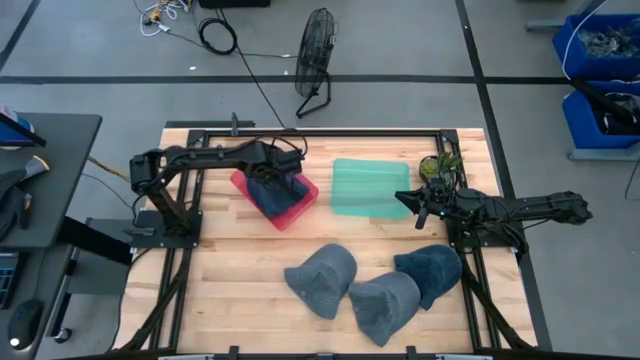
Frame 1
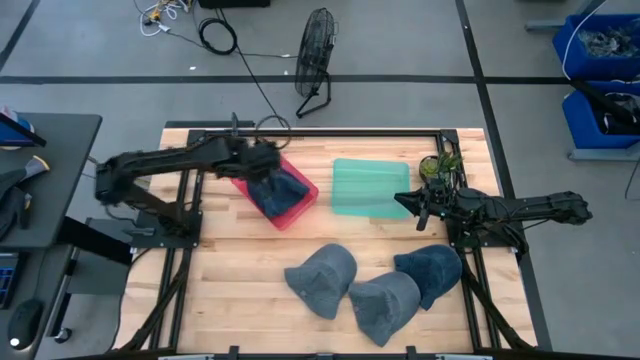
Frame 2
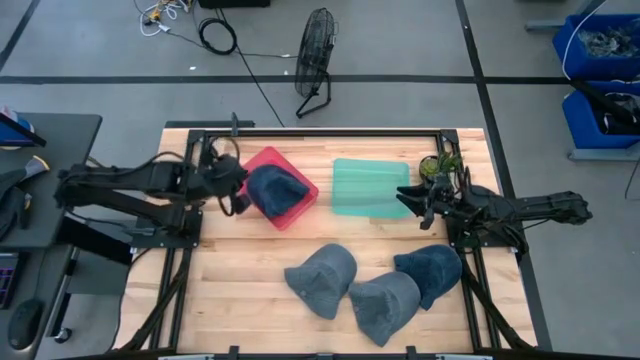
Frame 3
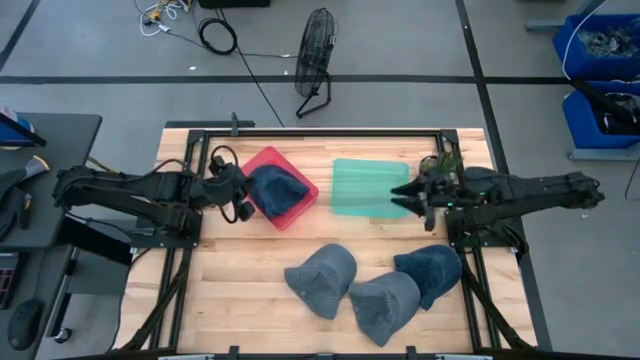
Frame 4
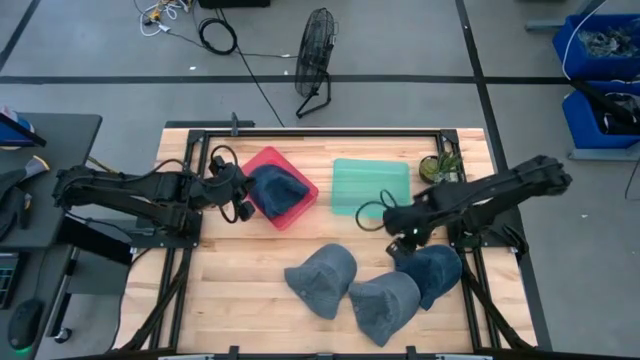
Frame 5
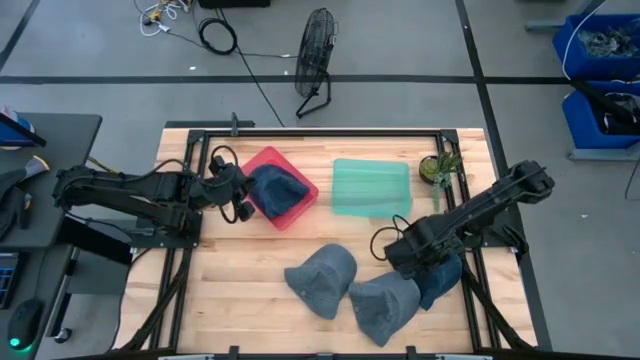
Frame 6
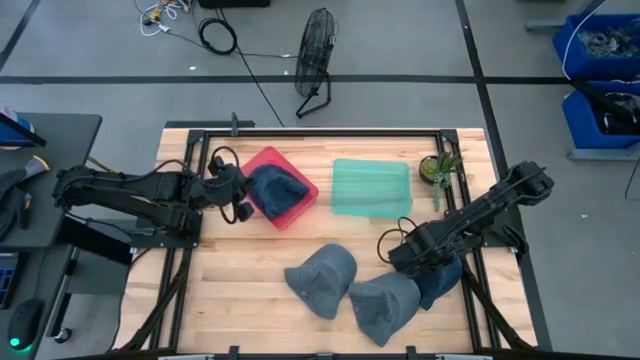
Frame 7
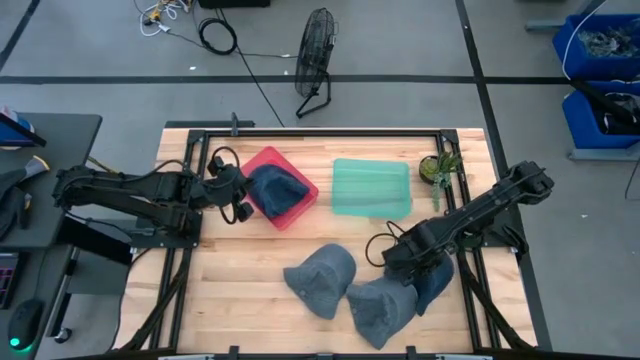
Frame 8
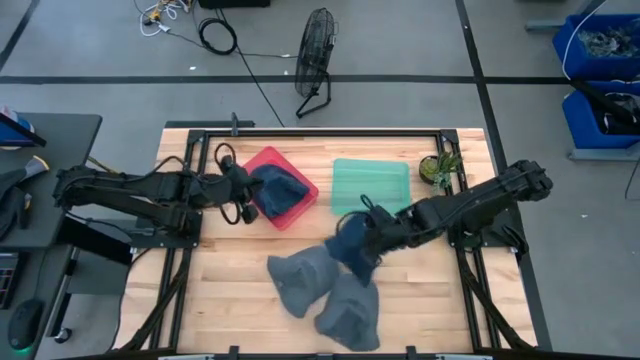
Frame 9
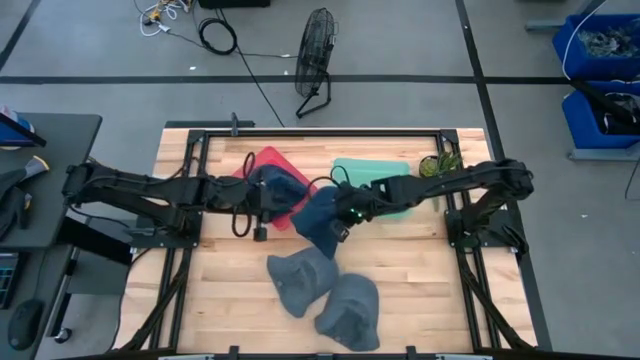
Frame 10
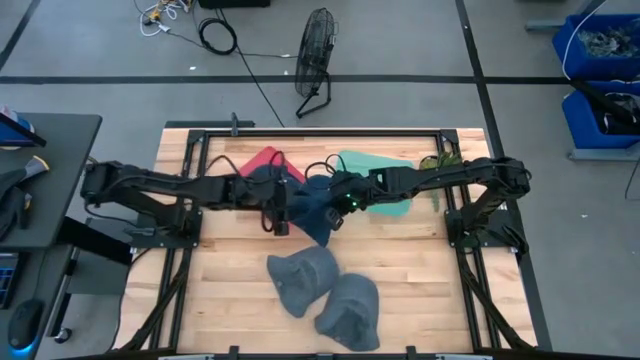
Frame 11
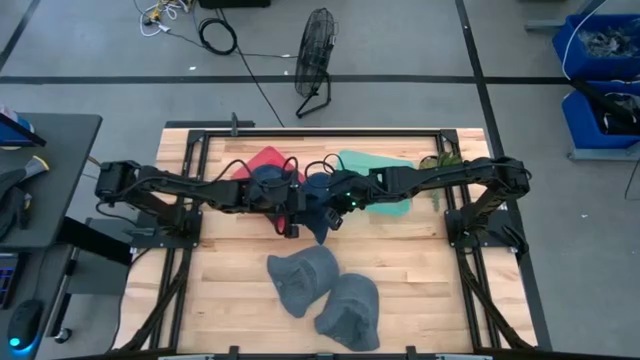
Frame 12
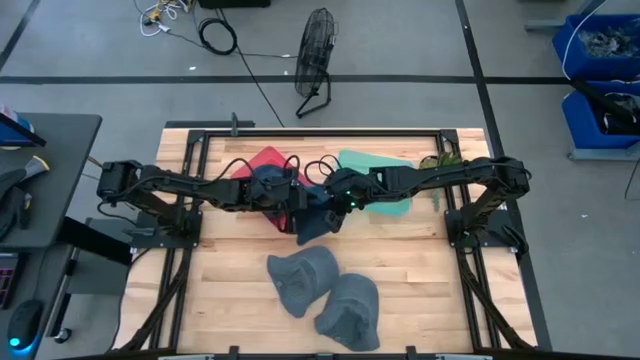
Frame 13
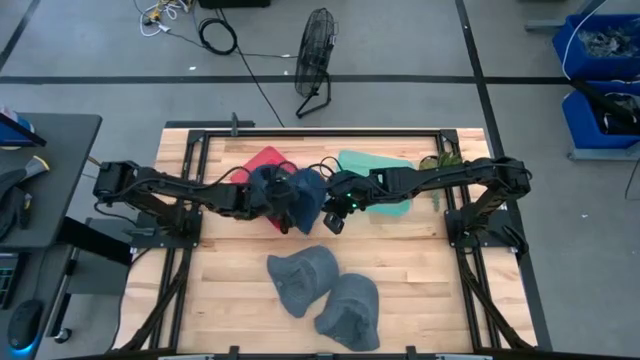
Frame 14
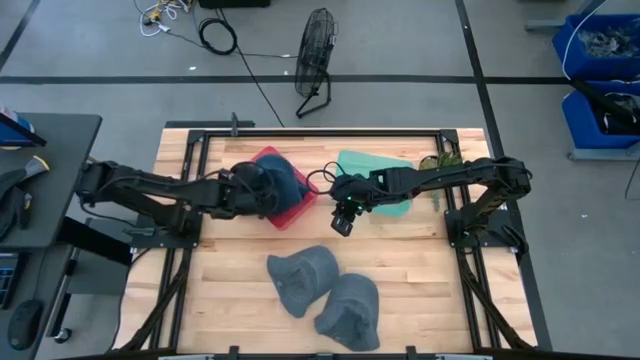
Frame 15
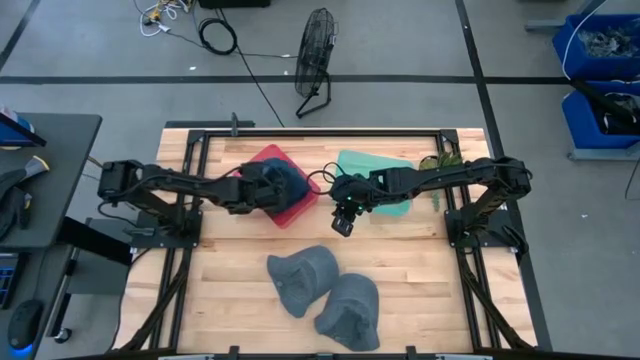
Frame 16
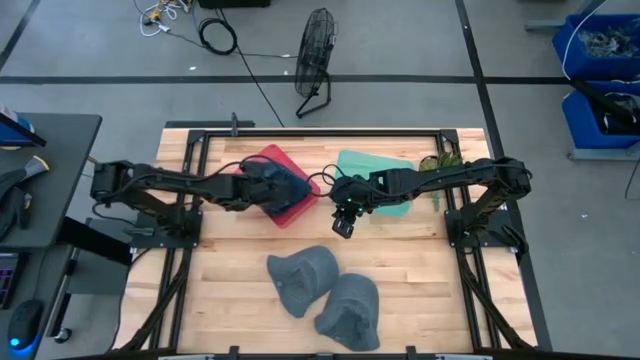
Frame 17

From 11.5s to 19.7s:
Task: Pick & Place hat
Put the blue into the red bin

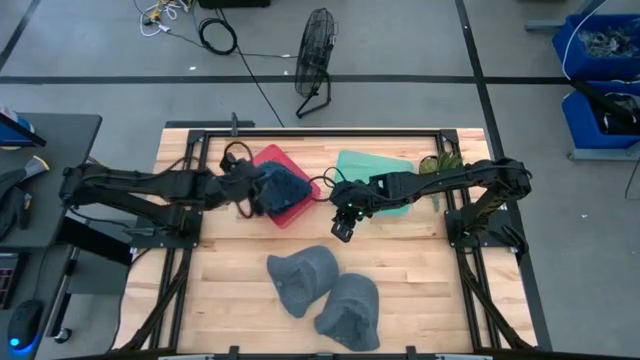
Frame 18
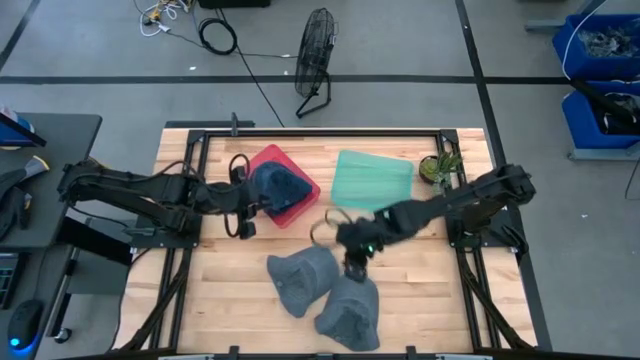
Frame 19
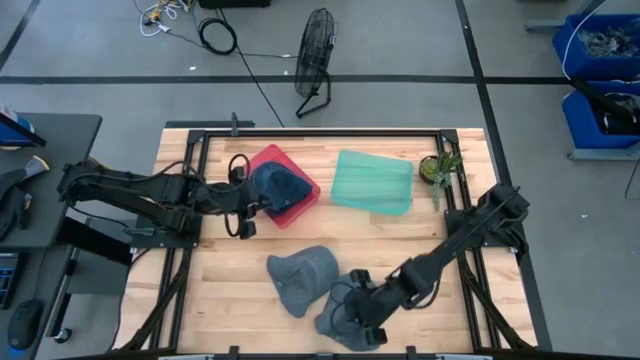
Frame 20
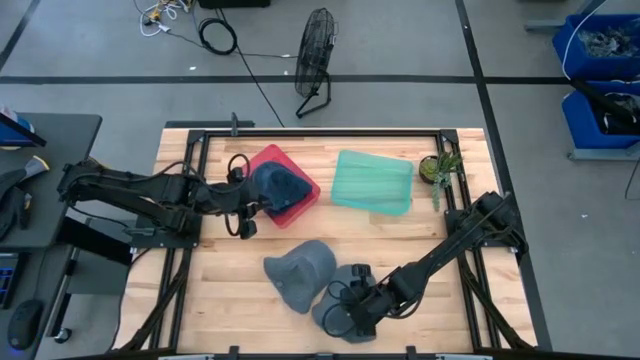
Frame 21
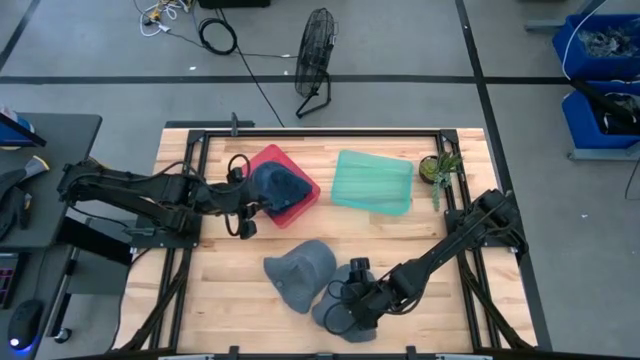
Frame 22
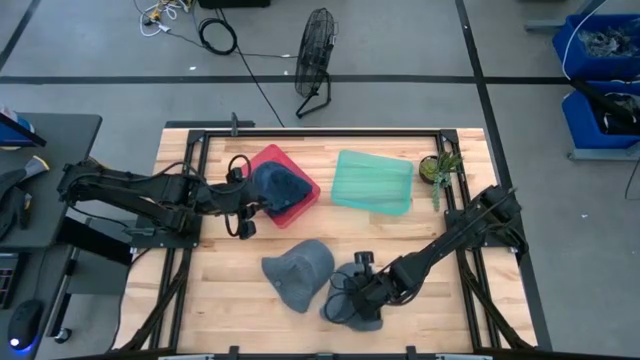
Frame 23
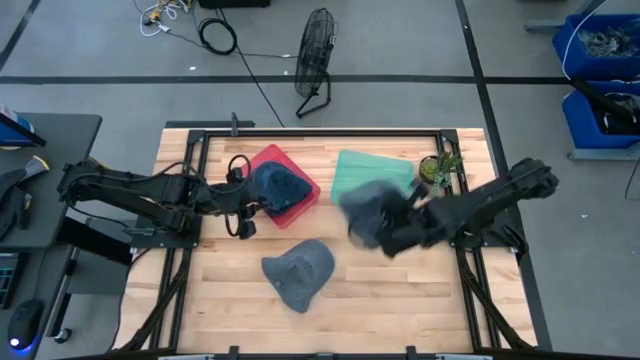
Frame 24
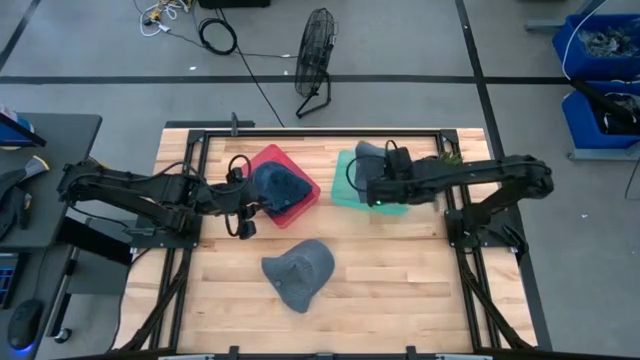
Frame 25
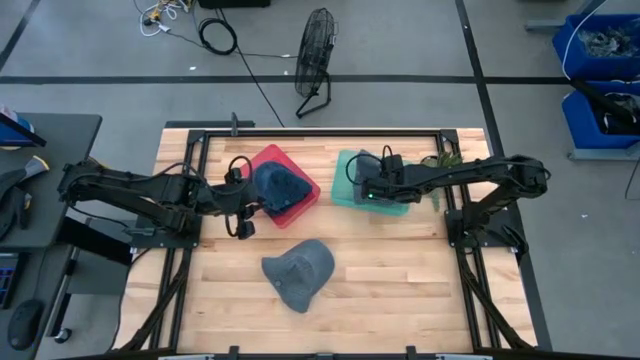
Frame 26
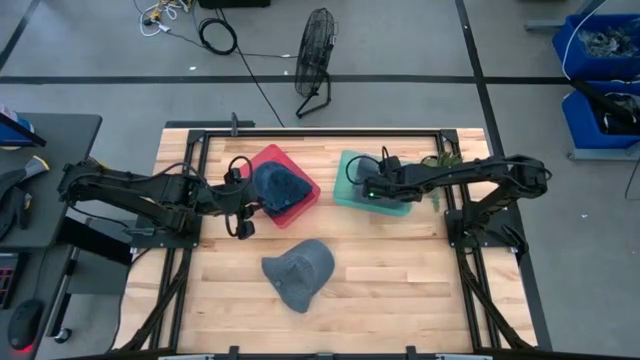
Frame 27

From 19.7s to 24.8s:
Put the right gray cap into the blue bin

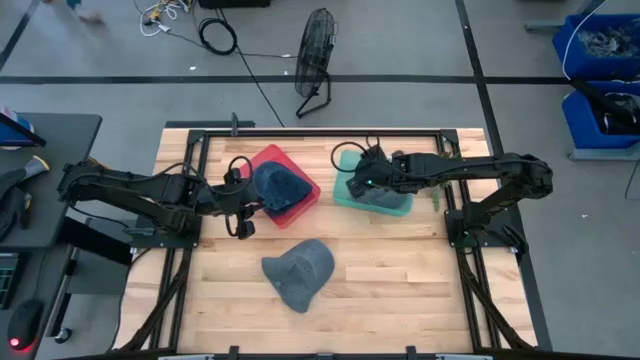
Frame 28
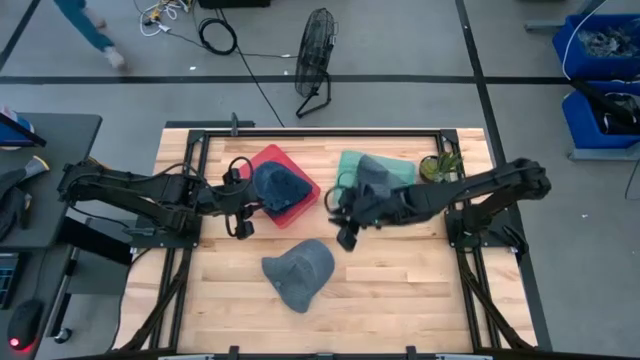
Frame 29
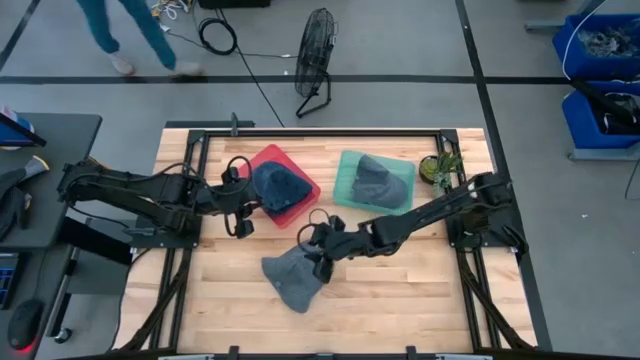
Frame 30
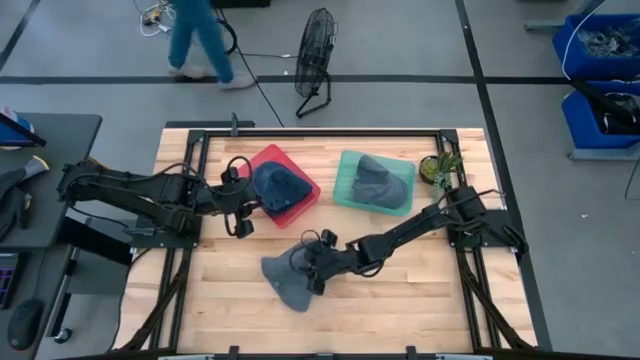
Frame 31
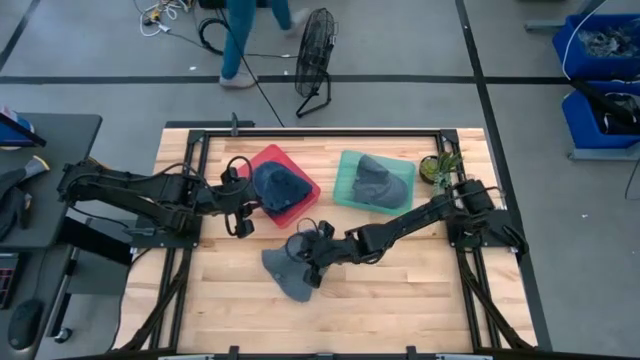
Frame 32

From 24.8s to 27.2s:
Put the gray cap into the blue bin

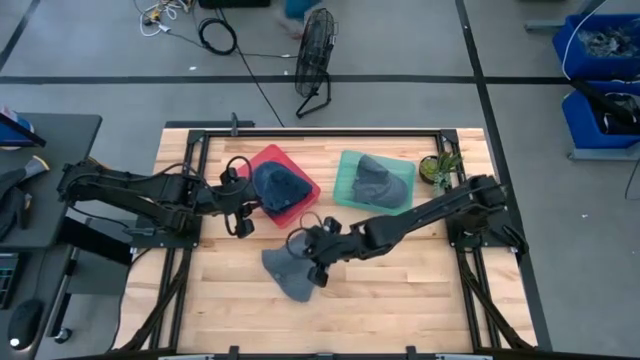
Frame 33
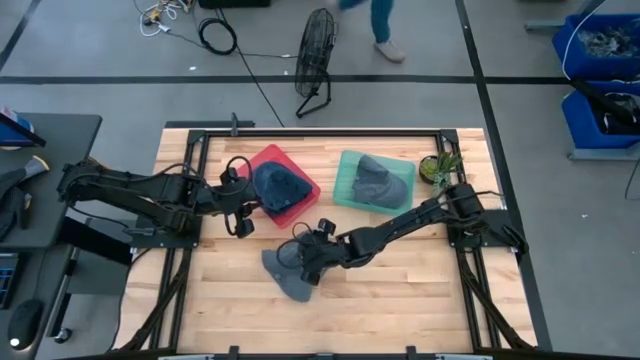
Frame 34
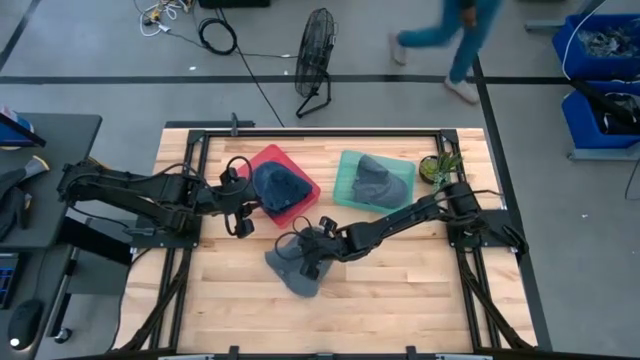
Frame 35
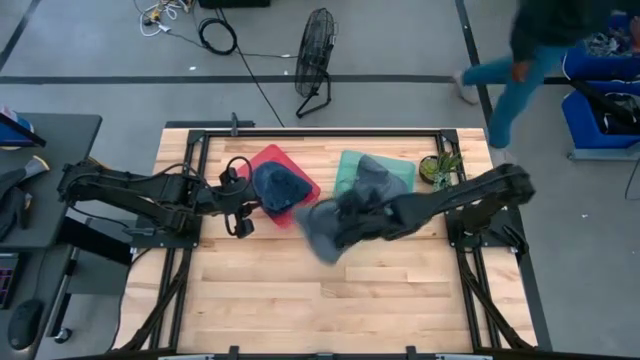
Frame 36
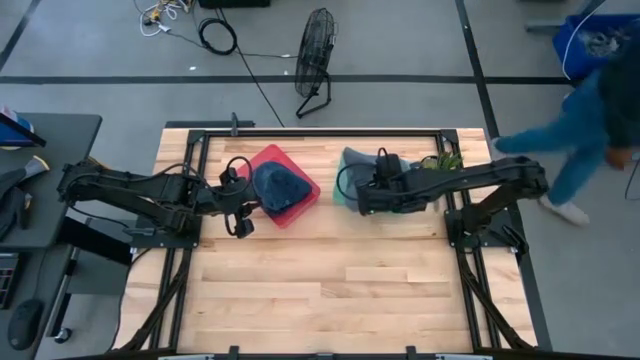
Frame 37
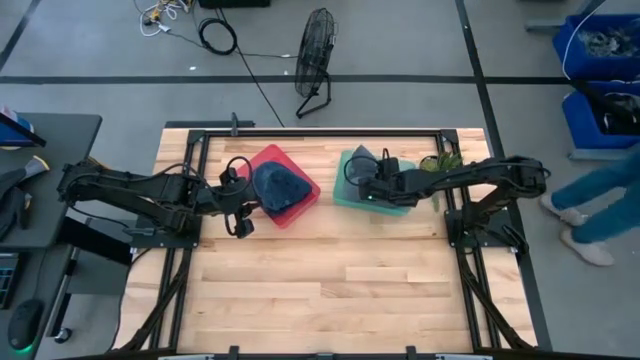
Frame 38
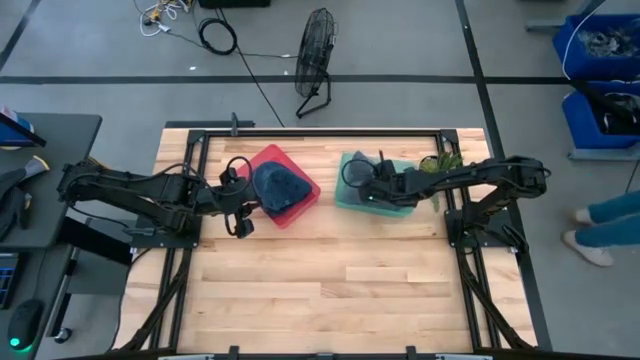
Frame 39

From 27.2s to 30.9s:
Put the gray cap into the blue bin

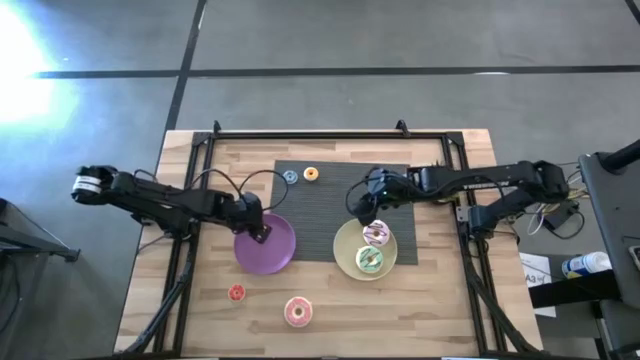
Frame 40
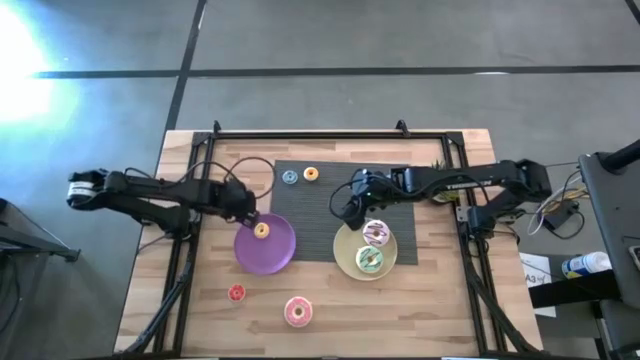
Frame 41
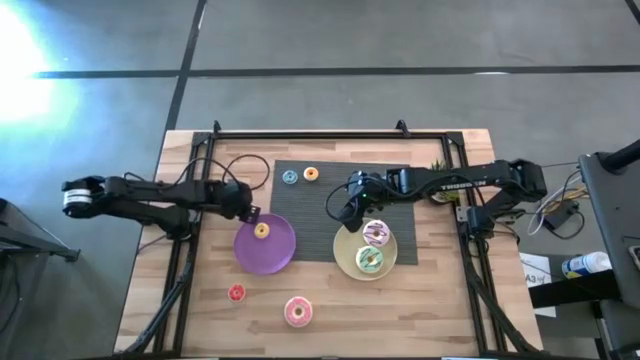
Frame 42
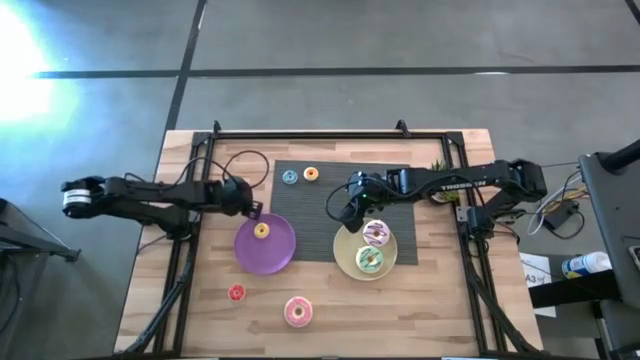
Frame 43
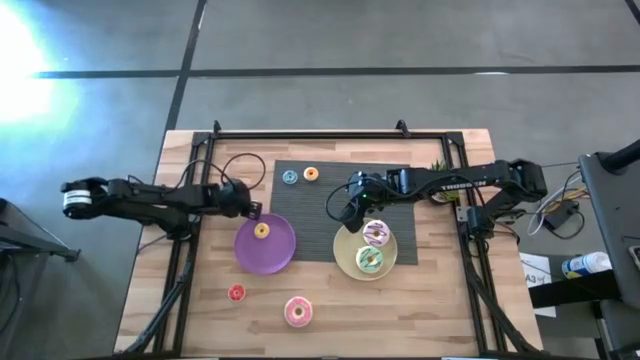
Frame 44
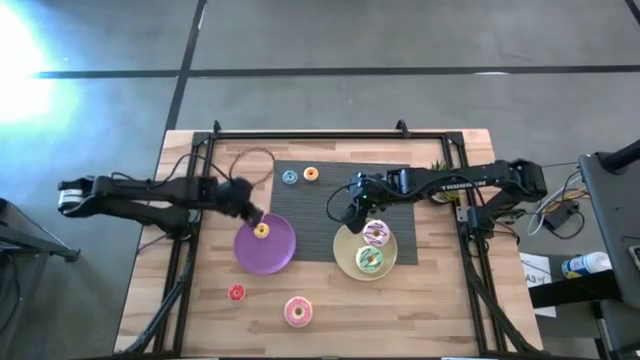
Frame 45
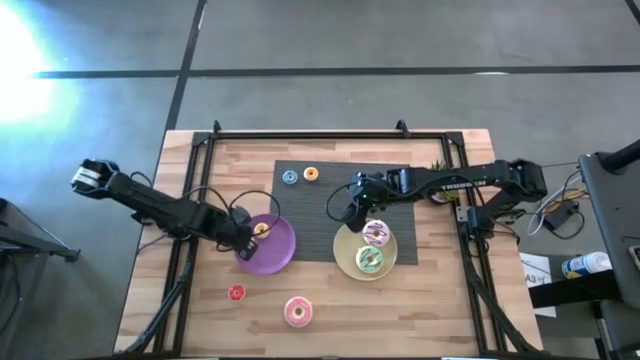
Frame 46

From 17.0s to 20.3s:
Task: Pick & Place donuts
Put the small white donut on the purple plate
